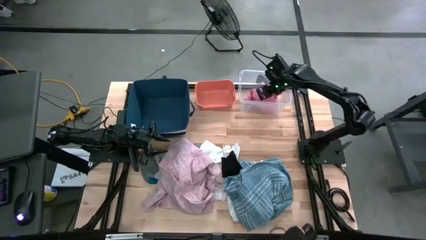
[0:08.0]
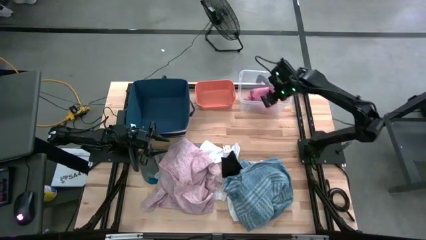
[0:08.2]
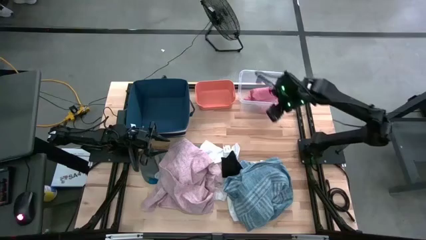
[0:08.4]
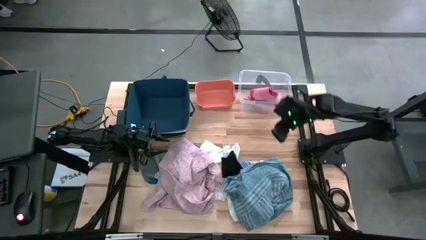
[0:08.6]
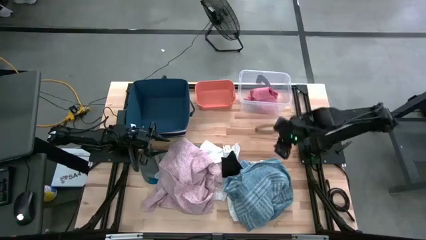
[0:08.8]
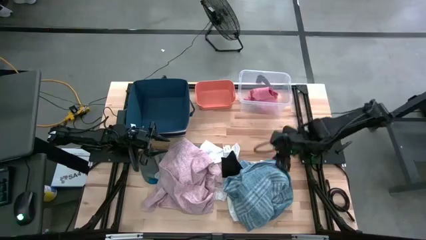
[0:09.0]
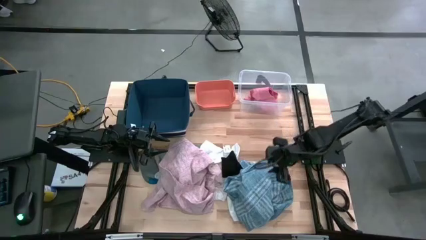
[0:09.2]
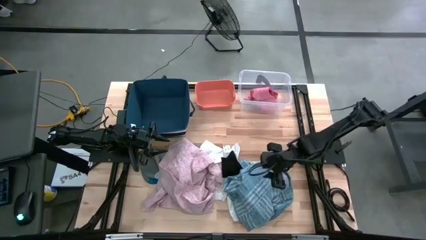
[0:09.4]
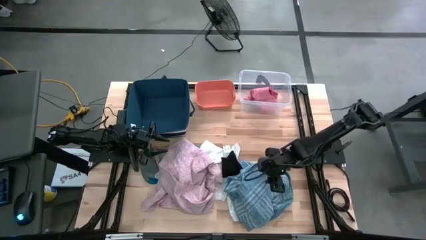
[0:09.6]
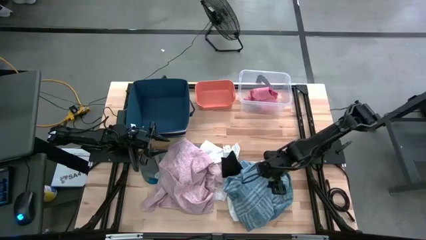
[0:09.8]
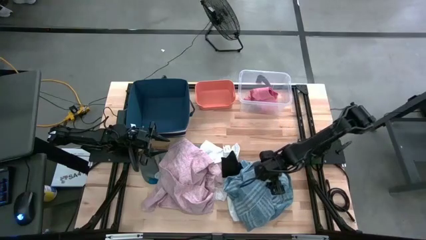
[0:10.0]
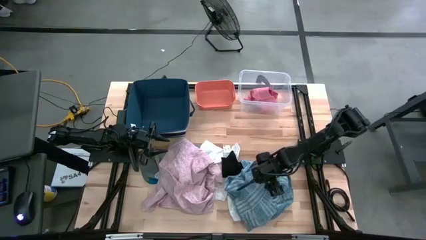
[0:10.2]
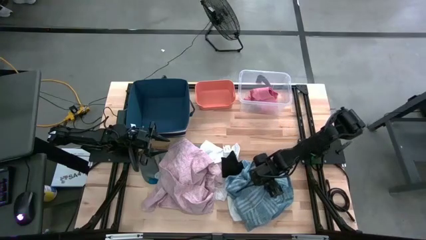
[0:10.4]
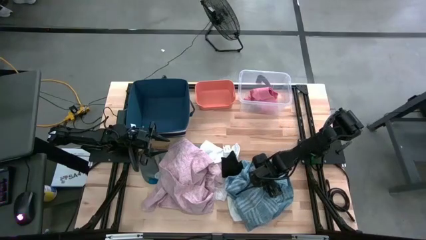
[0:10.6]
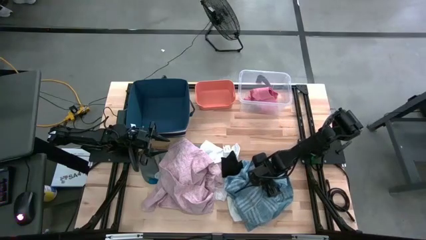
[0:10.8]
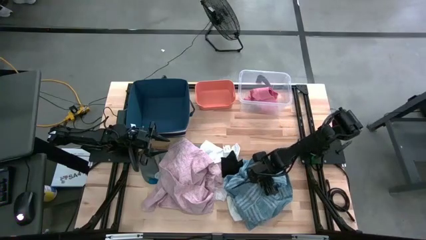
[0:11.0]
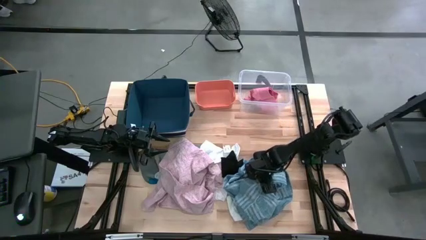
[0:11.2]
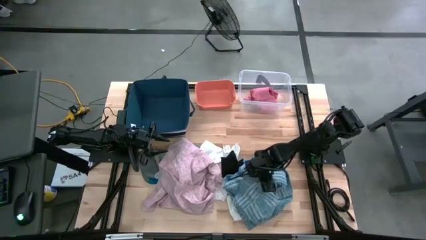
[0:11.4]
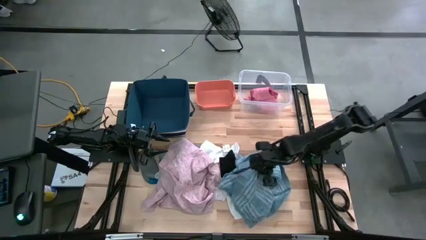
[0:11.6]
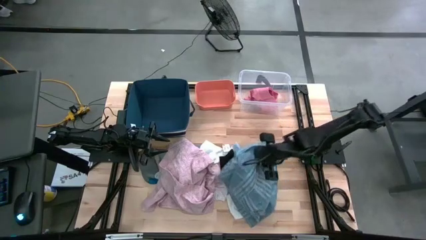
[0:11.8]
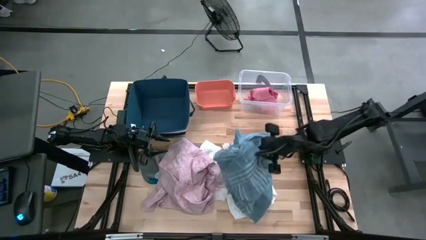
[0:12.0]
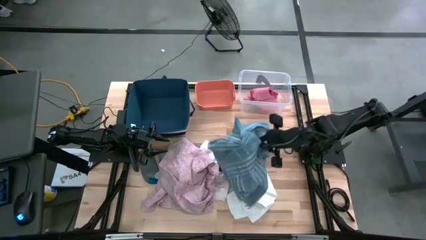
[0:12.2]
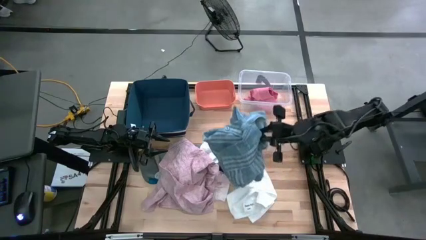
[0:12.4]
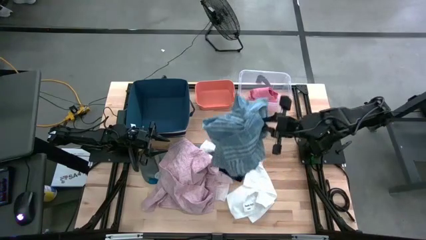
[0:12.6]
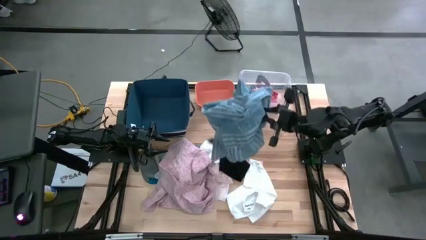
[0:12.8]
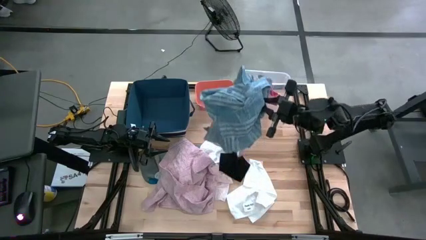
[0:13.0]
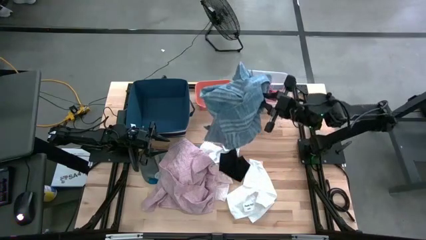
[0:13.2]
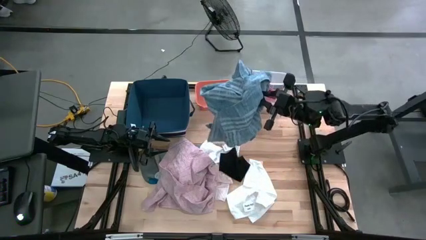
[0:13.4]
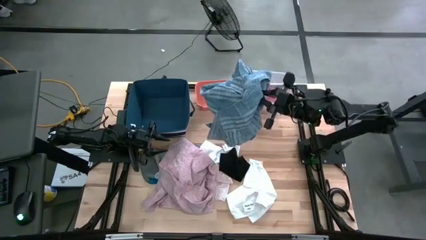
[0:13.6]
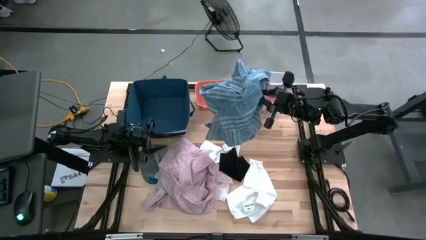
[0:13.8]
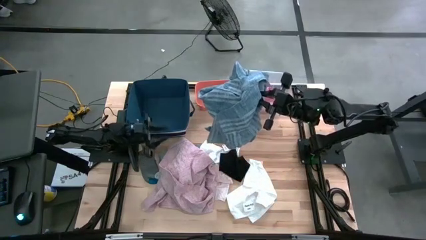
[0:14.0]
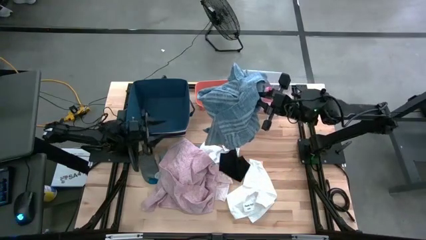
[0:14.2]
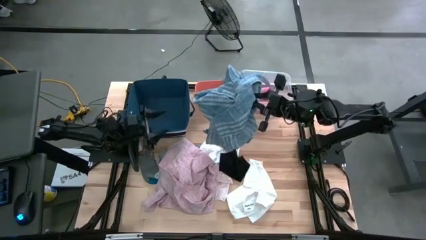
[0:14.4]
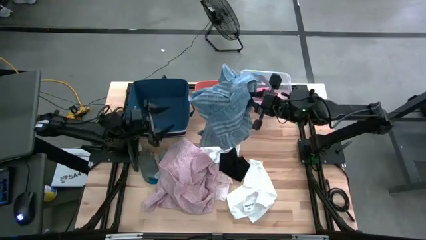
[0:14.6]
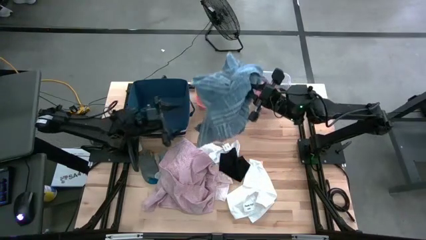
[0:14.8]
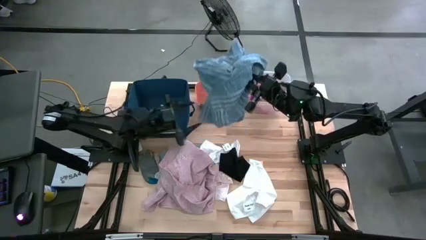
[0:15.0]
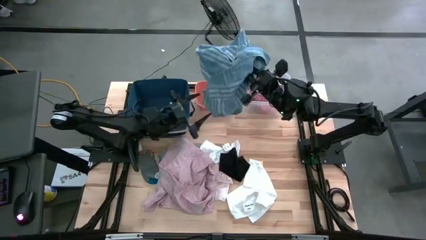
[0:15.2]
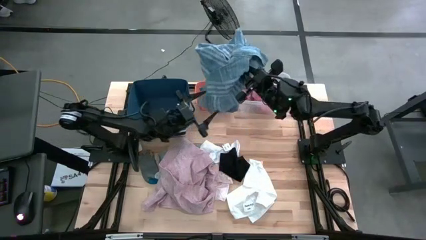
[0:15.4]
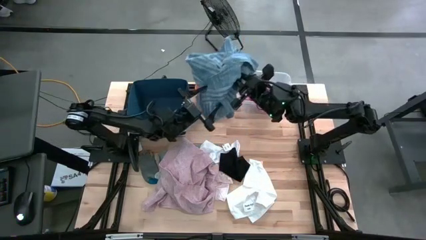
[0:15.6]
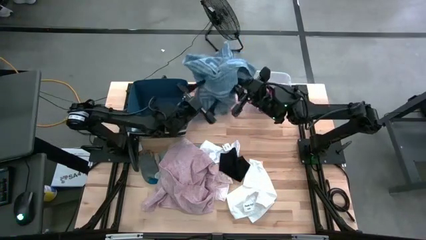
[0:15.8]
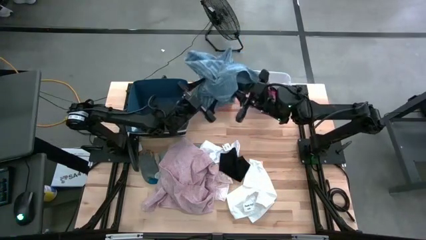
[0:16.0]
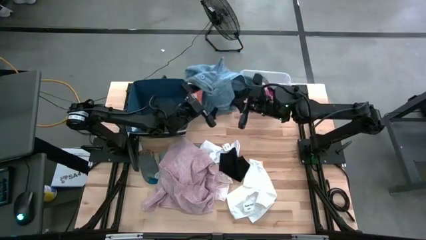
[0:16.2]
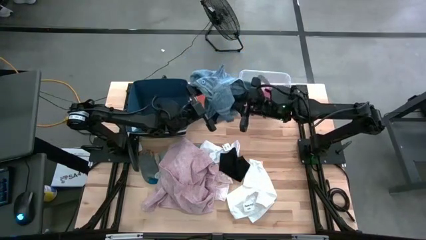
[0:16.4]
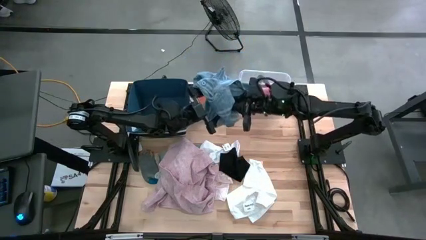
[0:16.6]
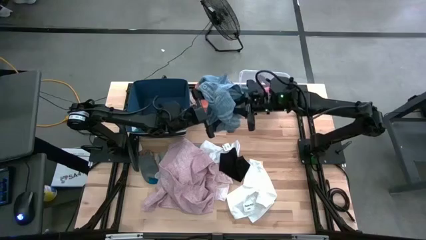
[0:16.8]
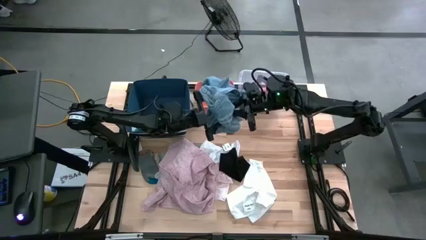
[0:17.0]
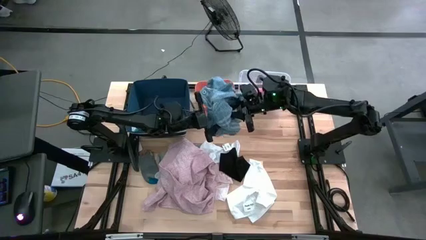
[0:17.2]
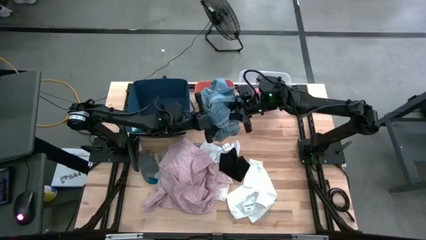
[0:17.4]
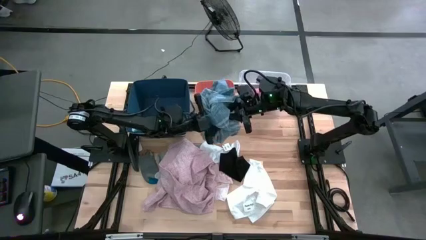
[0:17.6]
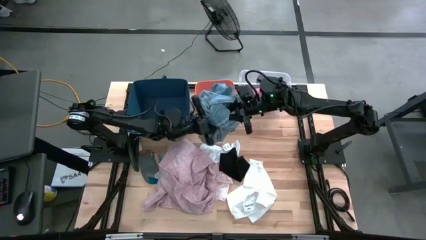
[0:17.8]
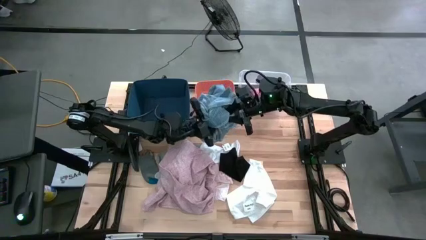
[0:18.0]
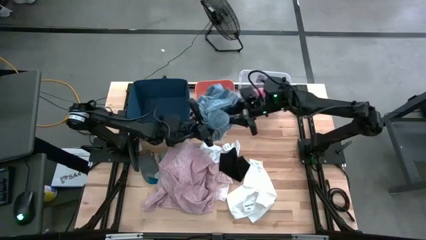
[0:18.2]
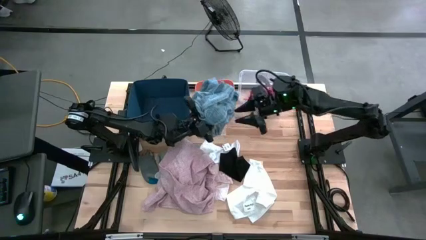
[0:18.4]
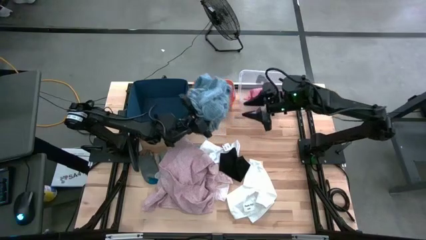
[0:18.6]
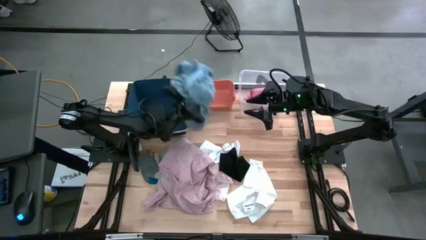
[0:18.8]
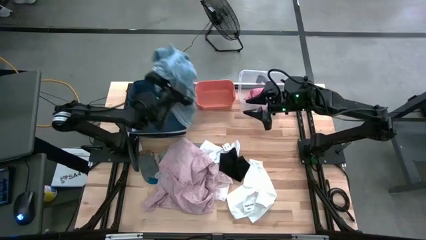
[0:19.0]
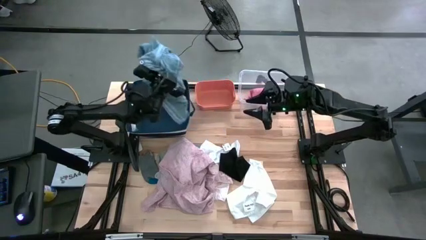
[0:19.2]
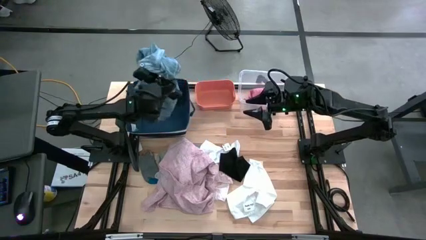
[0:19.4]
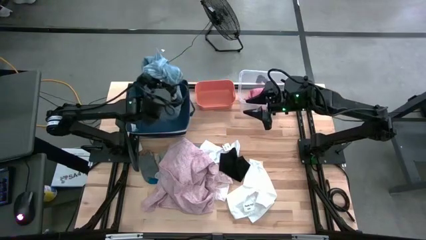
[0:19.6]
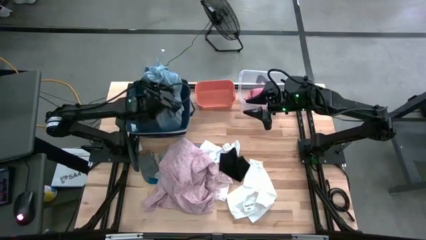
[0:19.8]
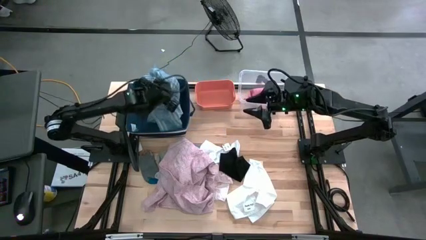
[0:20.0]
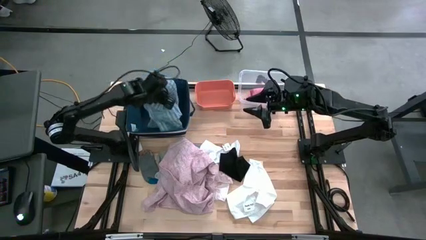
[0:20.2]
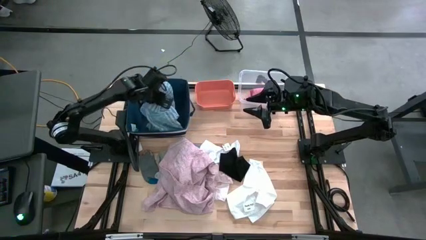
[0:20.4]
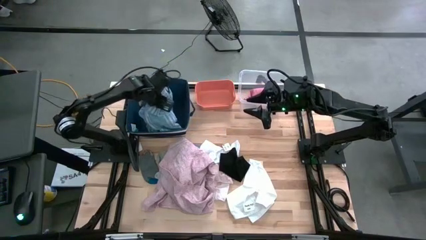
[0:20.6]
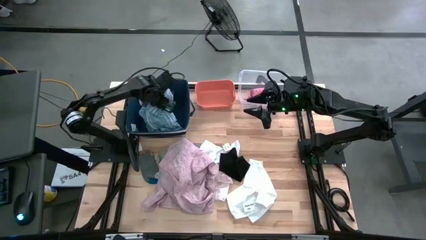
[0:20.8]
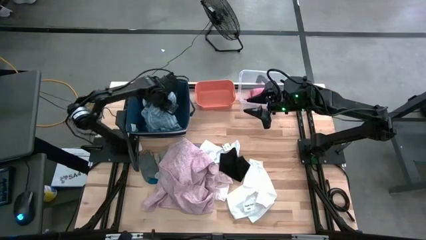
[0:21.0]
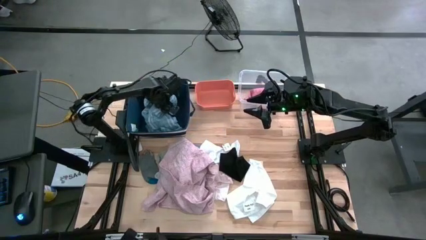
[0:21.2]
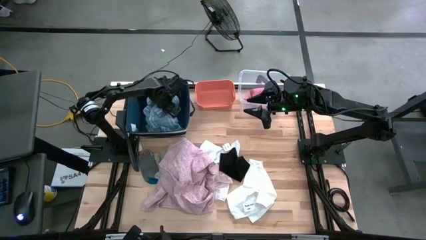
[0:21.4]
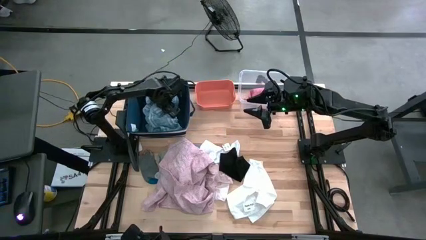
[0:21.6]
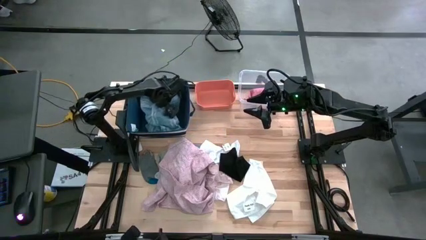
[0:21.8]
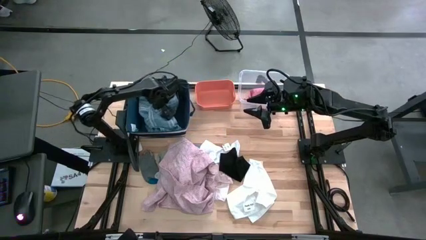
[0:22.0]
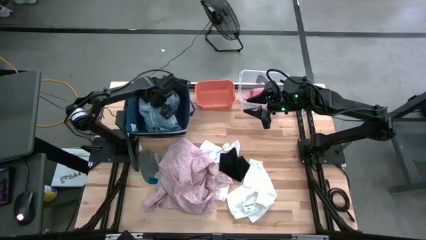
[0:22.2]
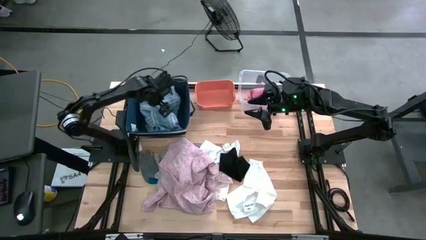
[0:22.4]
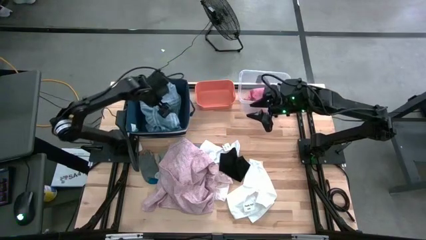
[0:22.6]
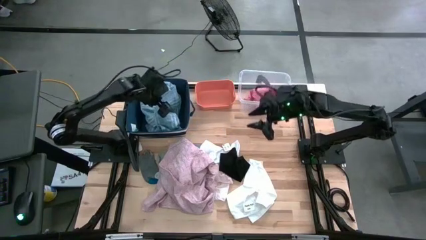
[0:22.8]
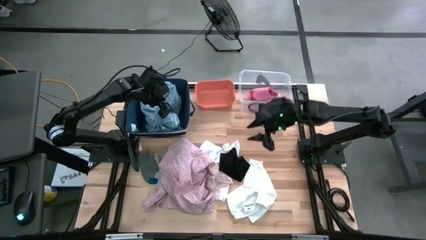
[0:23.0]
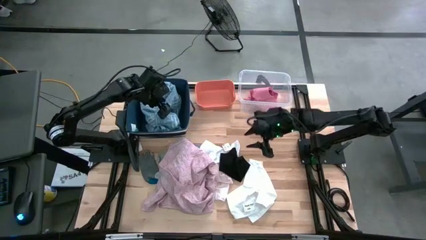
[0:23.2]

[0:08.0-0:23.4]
Task: Pick & Place Cloths
Put the blue polo into the blue organizer
